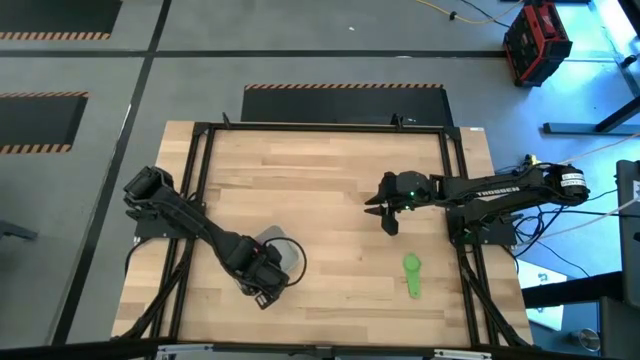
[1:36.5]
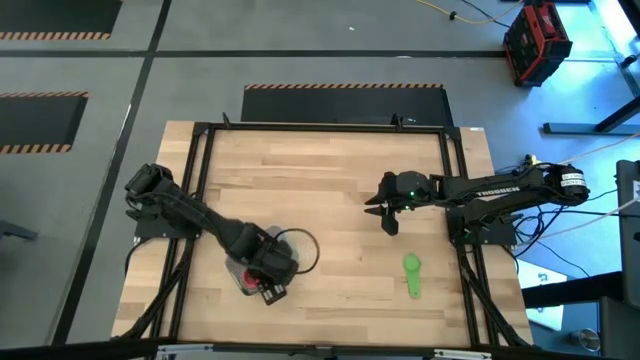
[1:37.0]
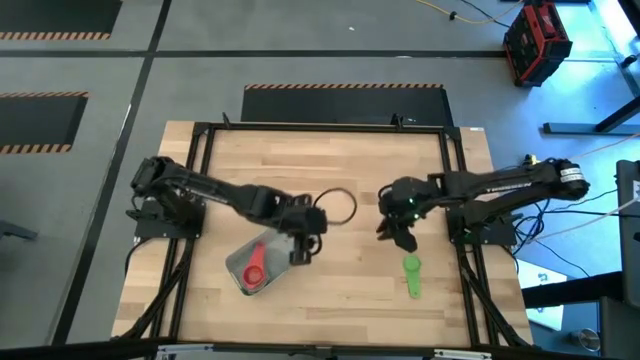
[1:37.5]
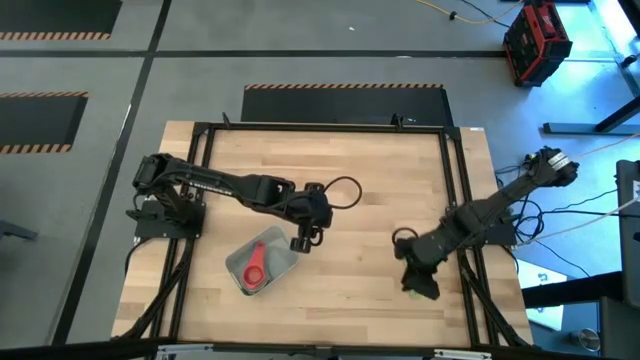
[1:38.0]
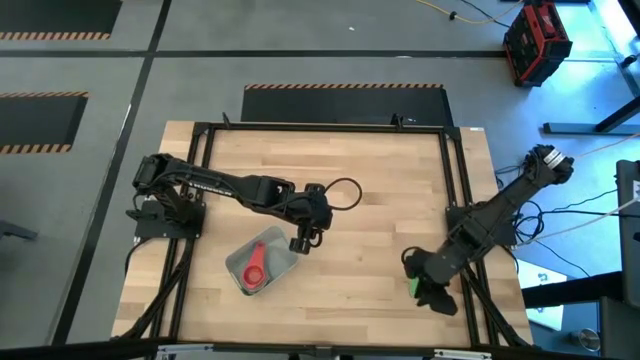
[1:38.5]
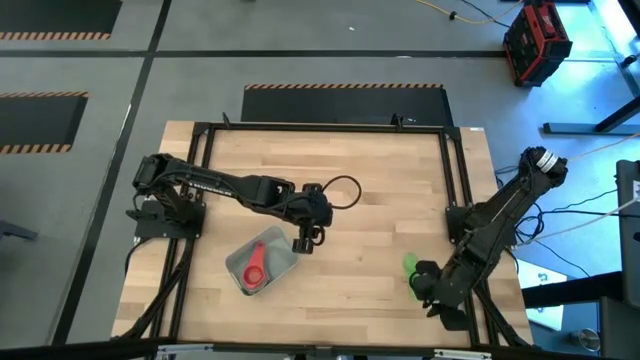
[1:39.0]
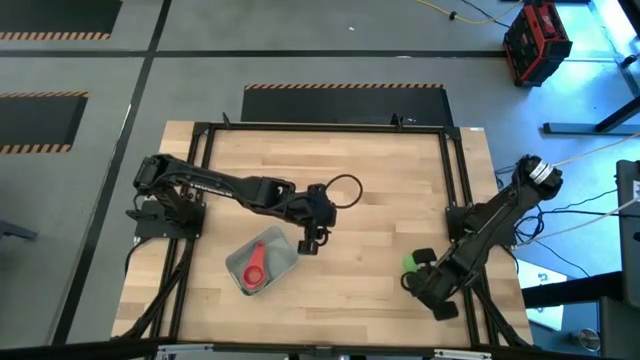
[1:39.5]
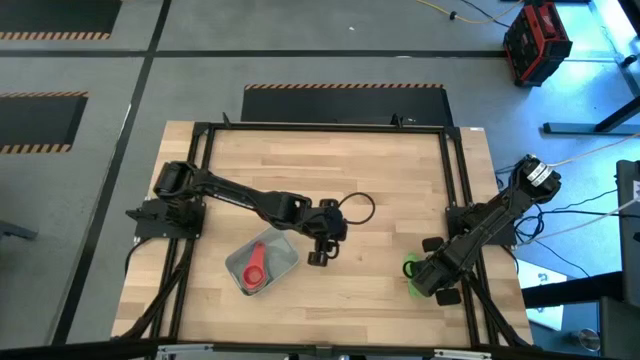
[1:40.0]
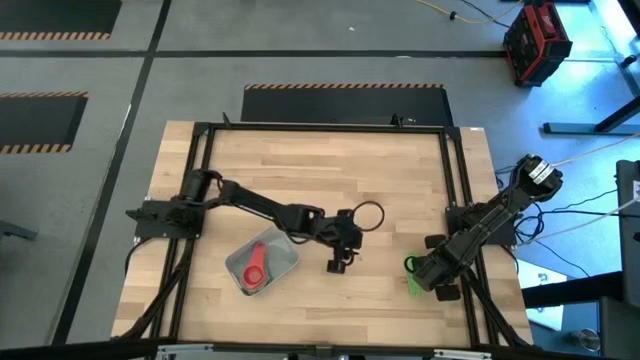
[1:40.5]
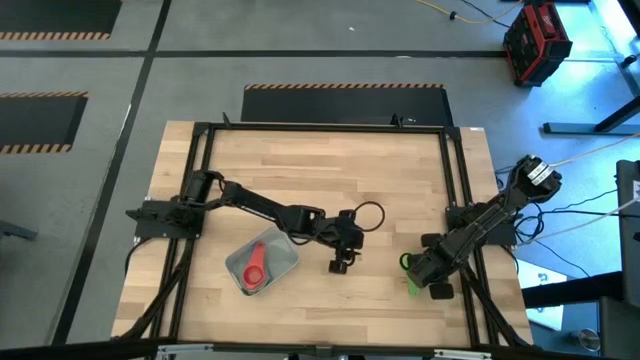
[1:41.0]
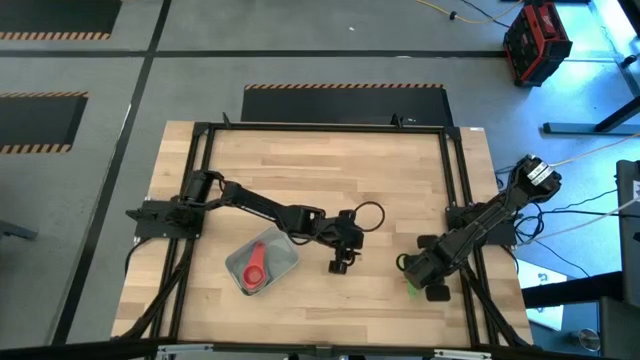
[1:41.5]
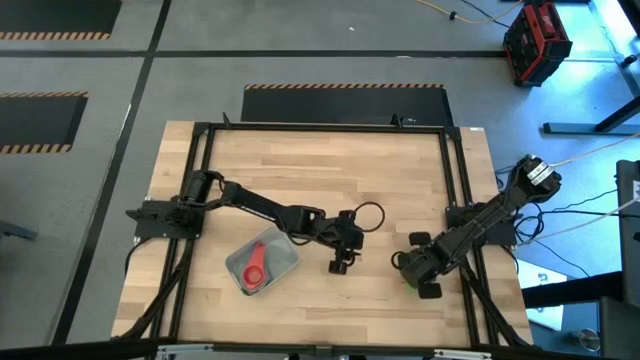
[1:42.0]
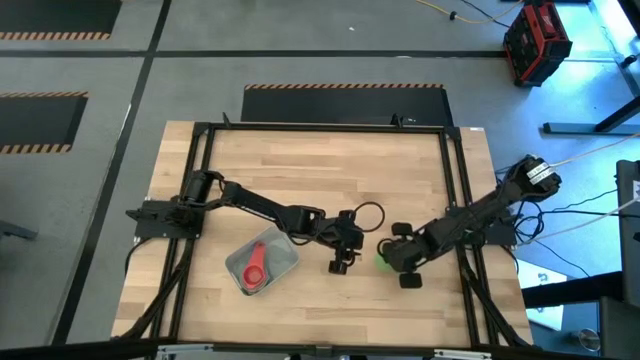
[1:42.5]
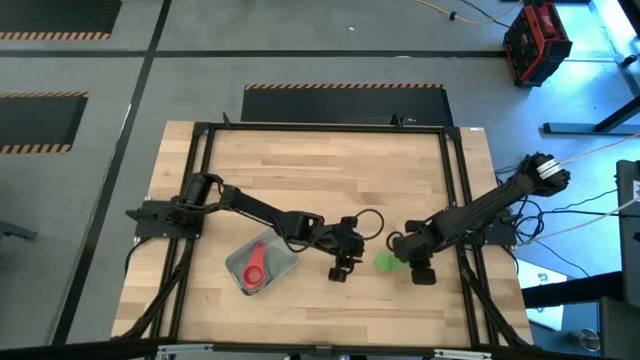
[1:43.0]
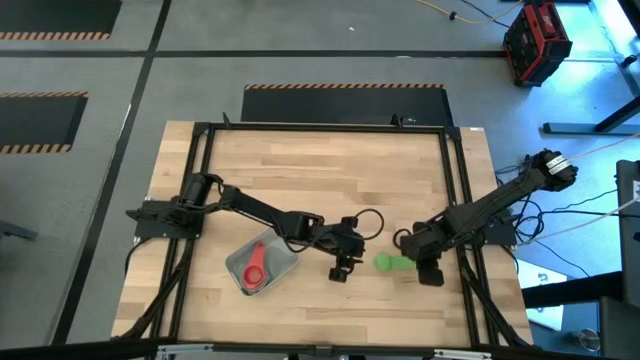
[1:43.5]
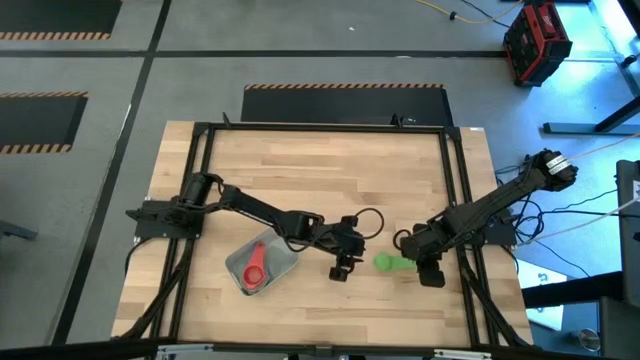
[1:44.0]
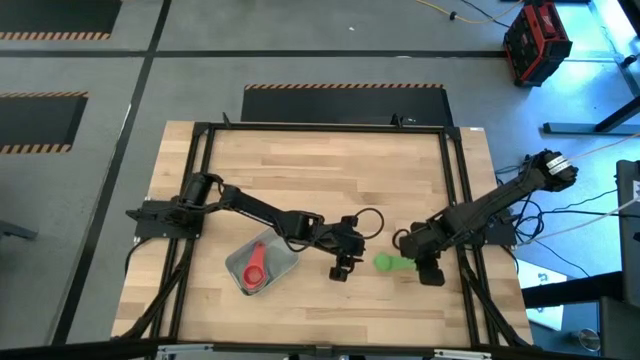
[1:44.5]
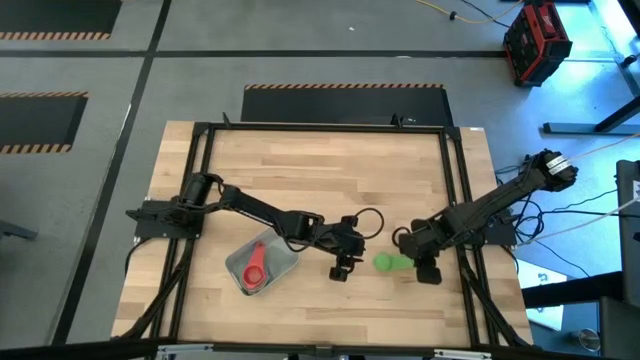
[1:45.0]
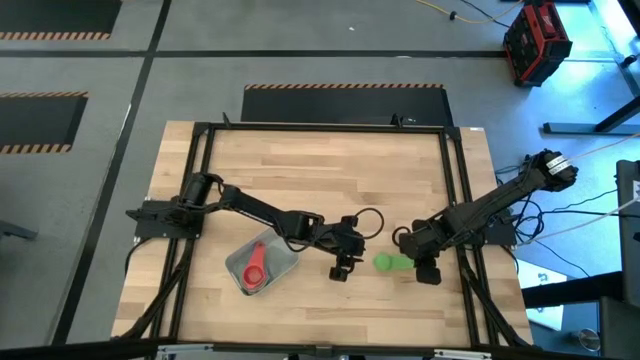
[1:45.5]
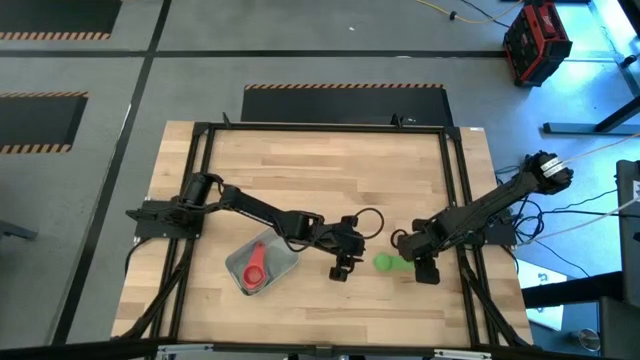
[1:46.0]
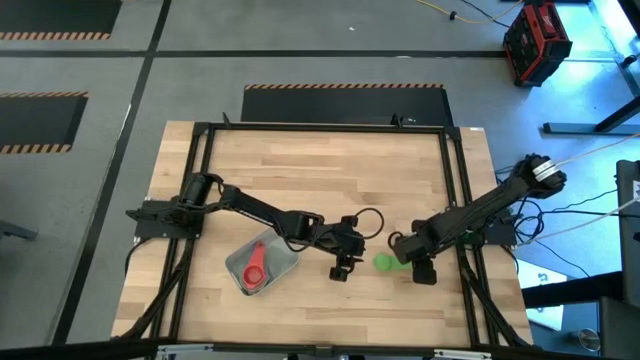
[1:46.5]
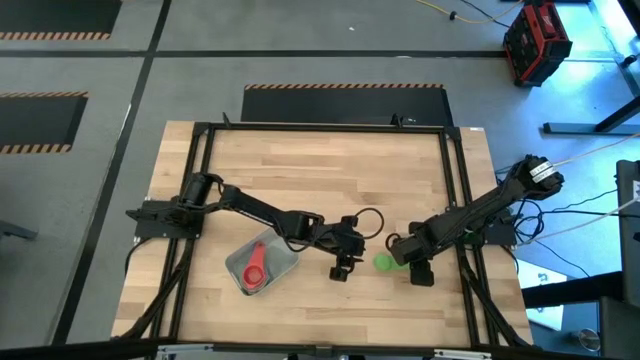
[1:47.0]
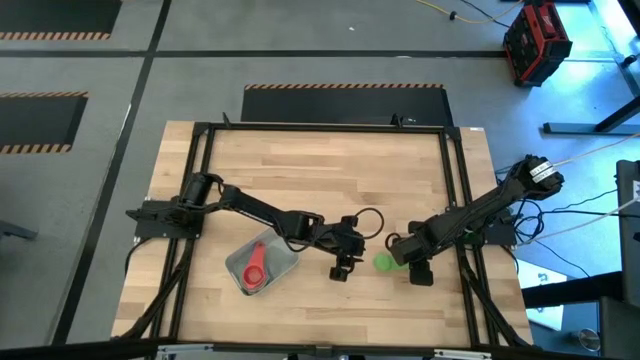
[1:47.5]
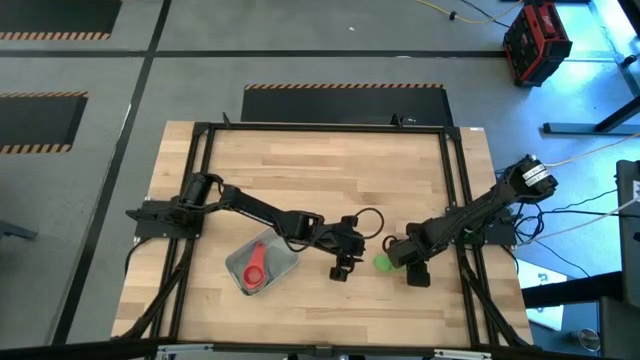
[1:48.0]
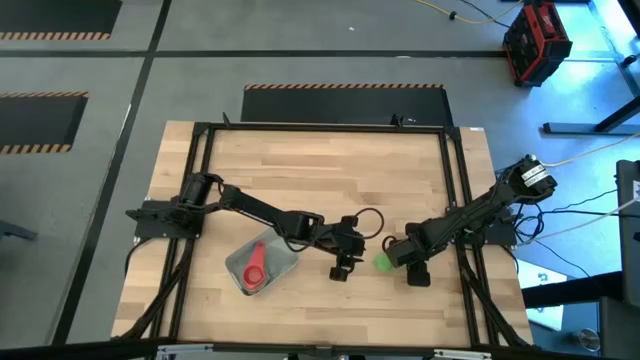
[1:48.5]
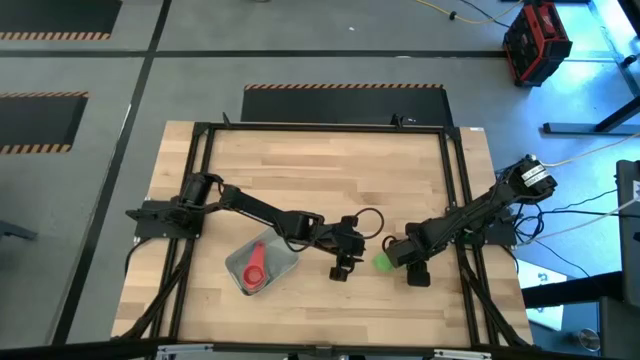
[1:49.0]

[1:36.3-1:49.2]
Task: Nest measuring cups in basket
Stack the green measuring cup on the red measuring cup in the gray bin

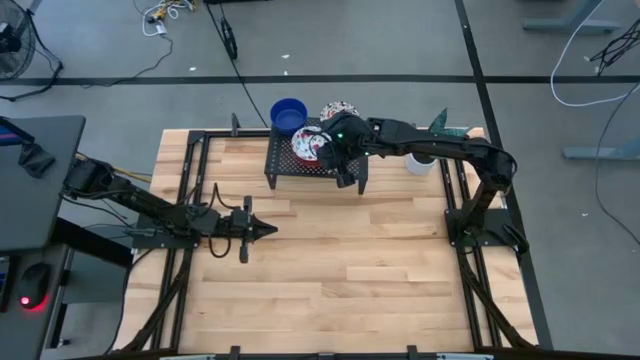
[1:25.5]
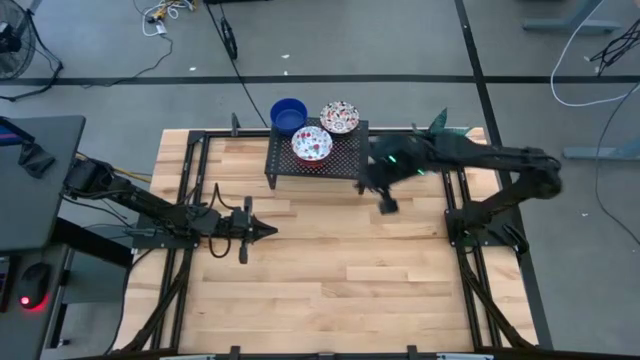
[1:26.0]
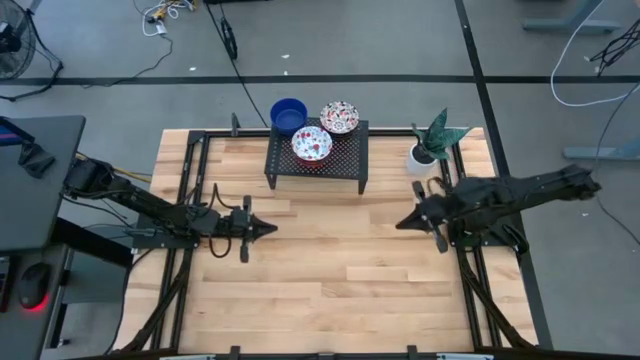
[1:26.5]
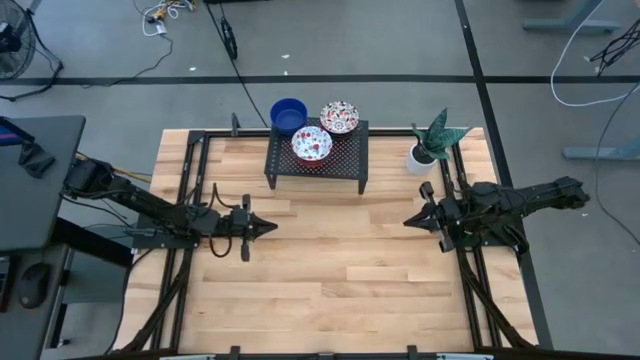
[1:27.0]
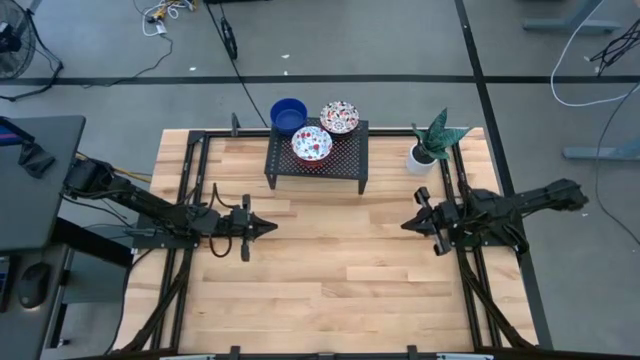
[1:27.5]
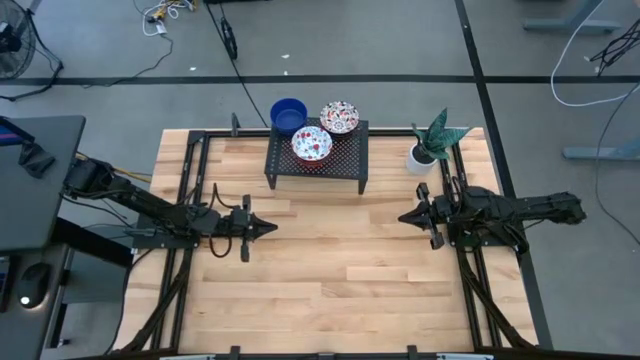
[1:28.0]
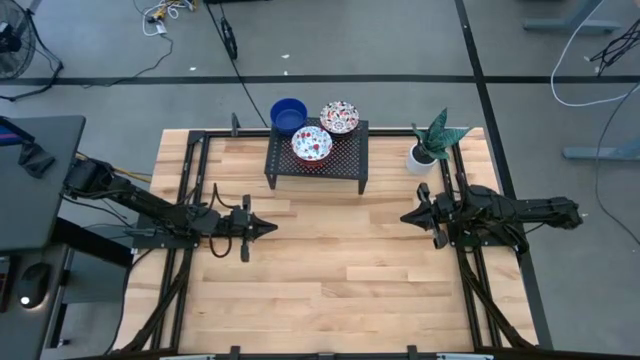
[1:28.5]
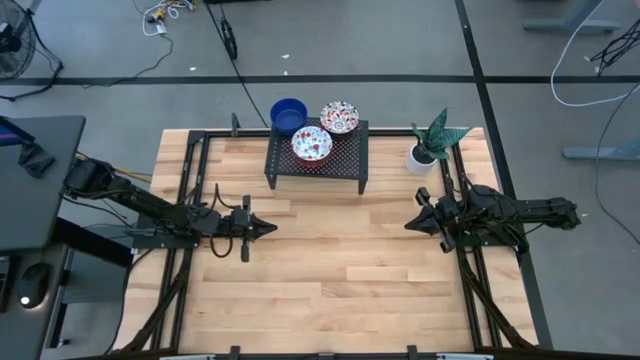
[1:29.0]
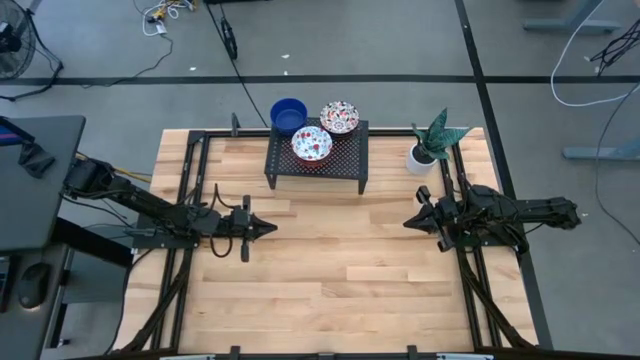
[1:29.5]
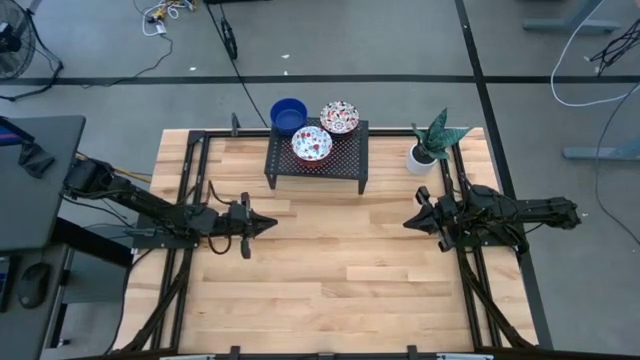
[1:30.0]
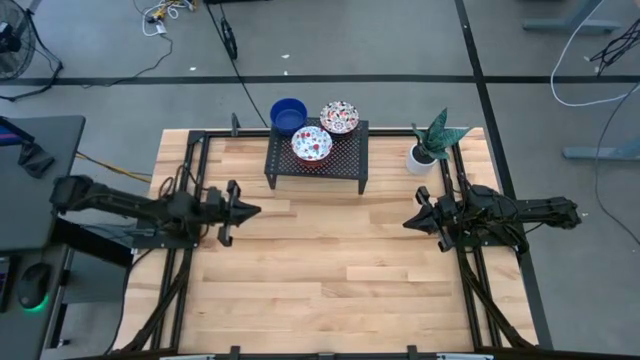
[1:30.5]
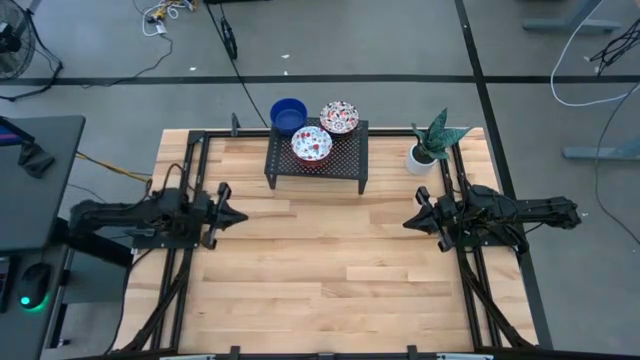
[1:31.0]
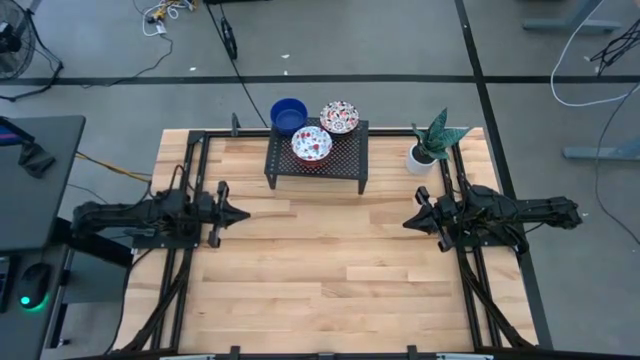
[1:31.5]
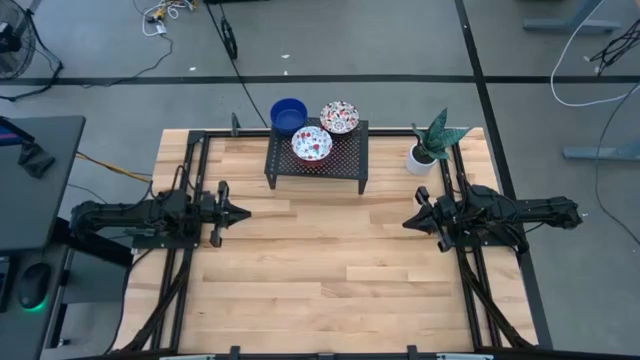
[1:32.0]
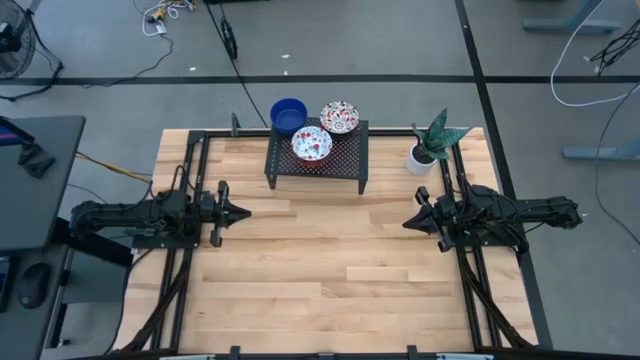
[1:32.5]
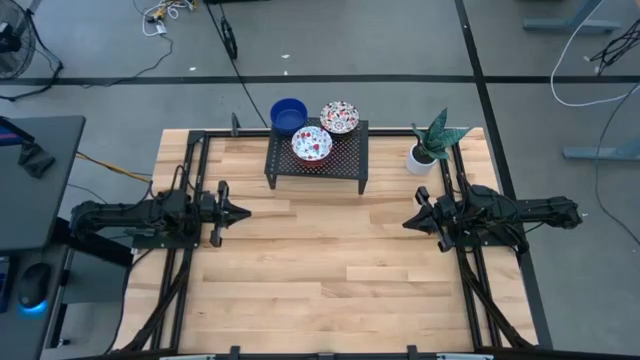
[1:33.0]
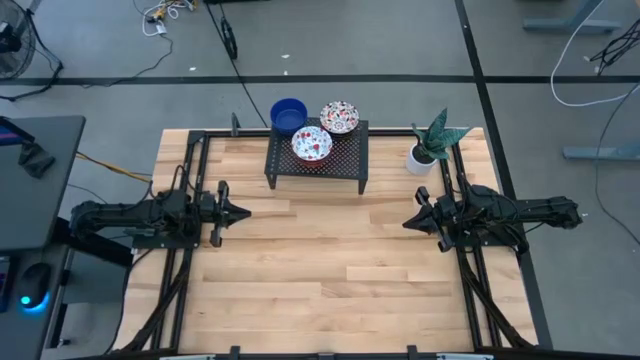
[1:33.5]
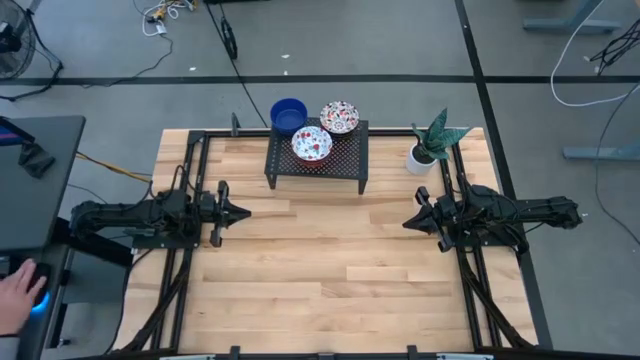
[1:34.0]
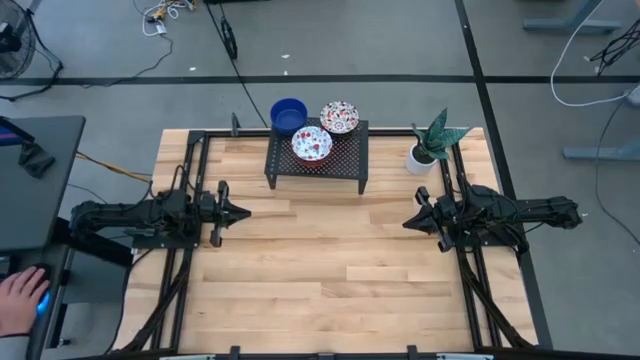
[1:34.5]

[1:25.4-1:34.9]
Task: Pick & Place Mini bowls
Return to Home Position
